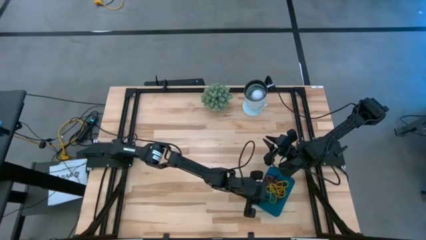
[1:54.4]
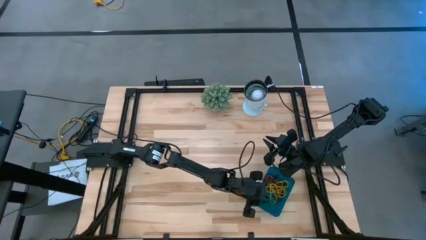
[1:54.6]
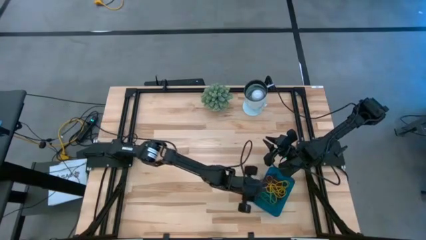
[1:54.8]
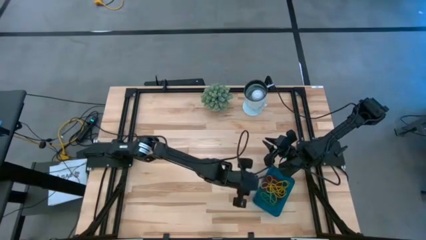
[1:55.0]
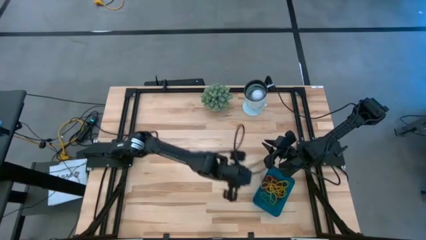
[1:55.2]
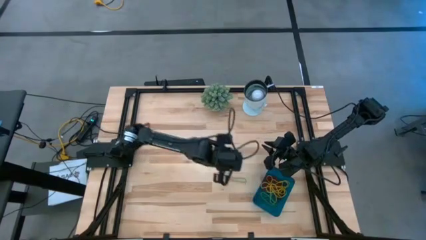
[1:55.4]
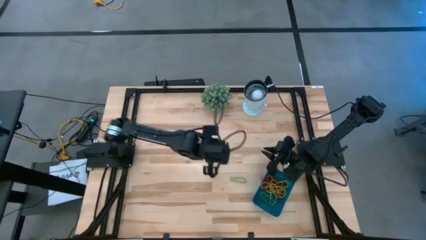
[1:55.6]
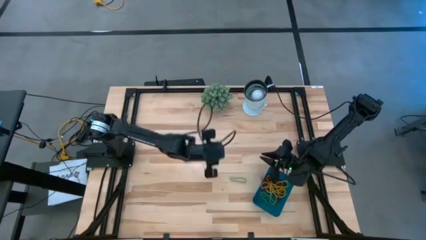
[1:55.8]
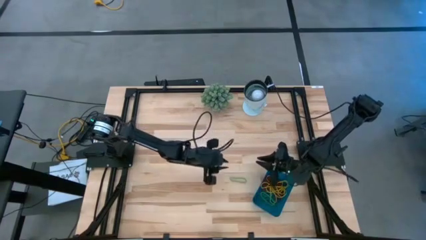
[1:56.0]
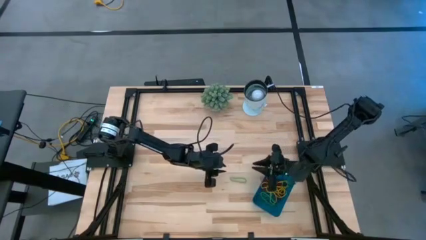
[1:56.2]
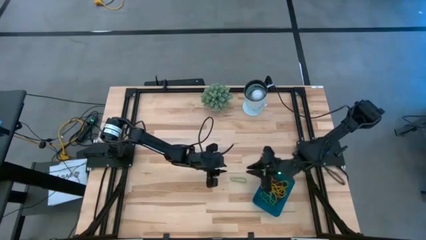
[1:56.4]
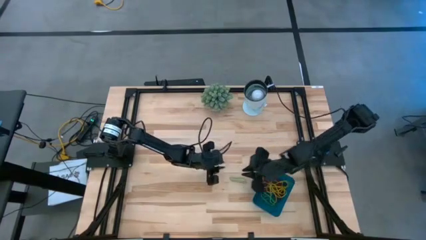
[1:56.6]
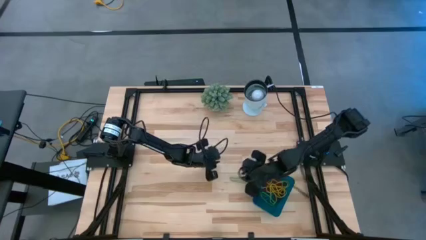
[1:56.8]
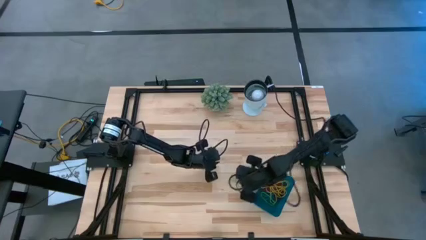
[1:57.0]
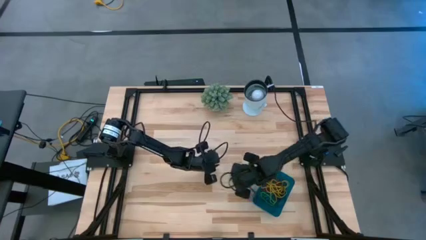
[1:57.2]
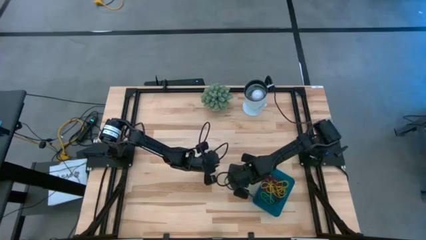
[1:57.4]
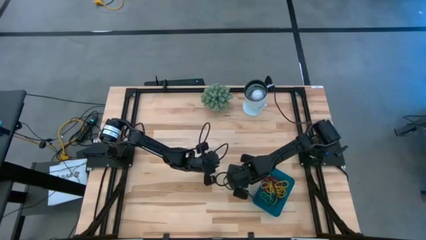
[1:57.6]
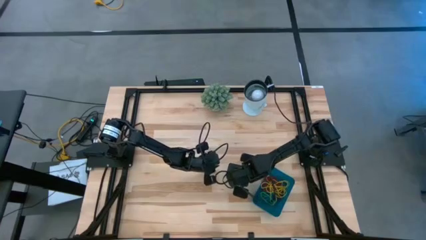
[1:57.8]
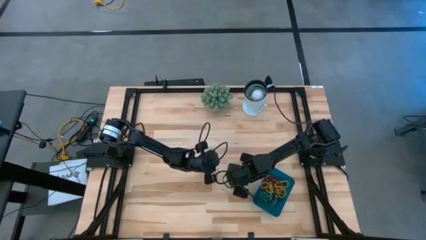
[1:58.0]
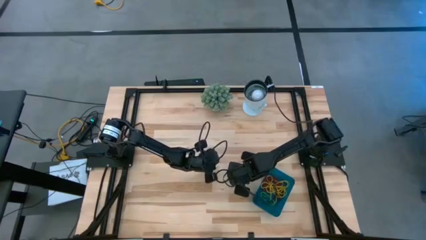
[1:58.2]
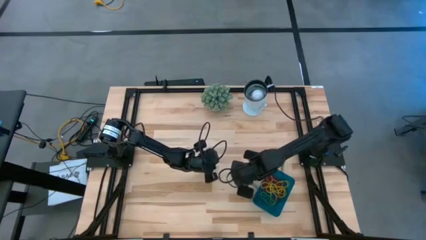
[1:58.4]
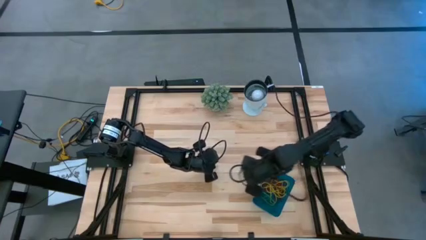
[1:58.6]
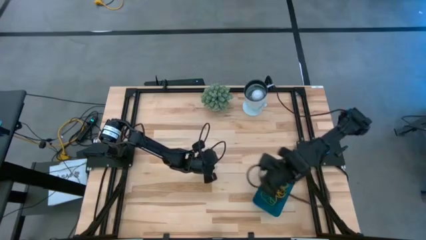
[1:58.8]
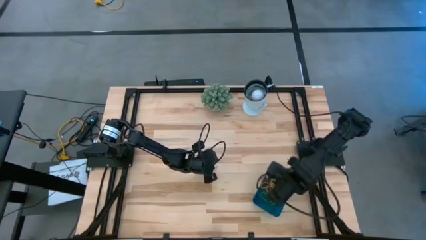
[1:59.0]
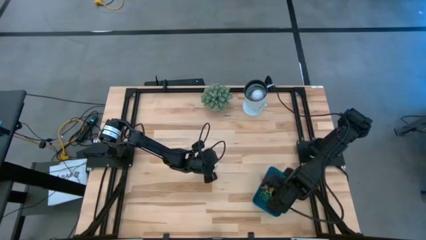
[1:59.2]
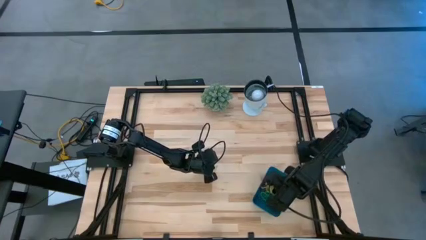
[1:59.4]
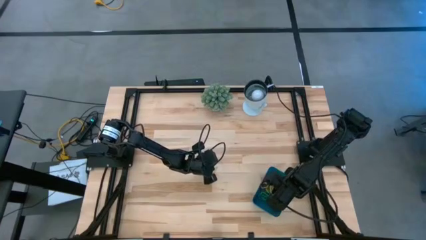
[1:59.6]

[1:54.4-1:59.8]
Task: Pick and place items into bin
Put the green rubber band into the blue bin

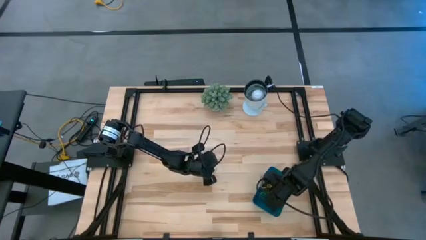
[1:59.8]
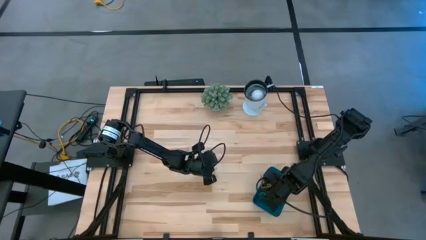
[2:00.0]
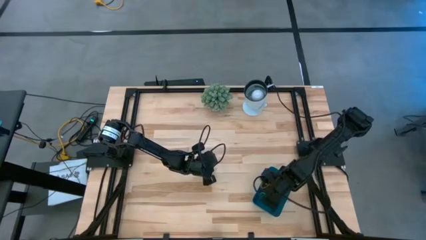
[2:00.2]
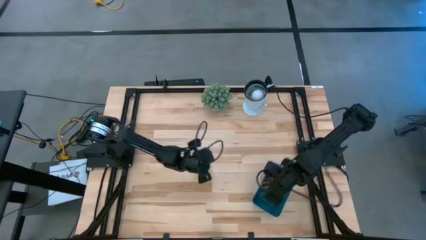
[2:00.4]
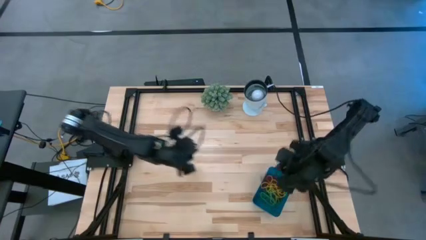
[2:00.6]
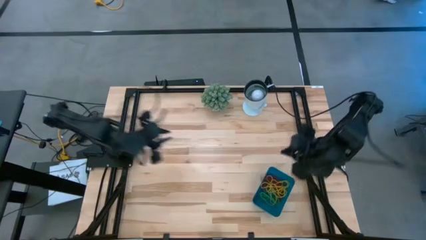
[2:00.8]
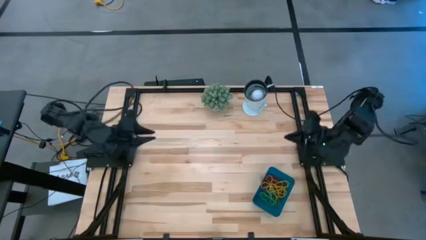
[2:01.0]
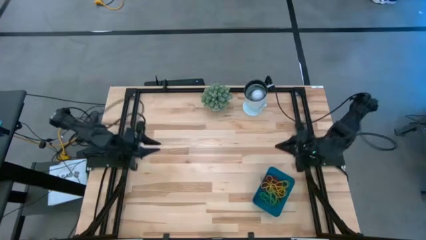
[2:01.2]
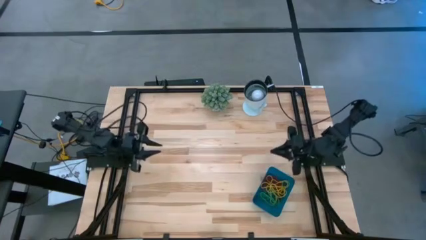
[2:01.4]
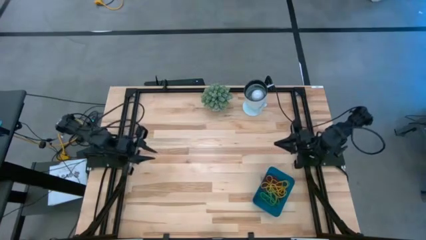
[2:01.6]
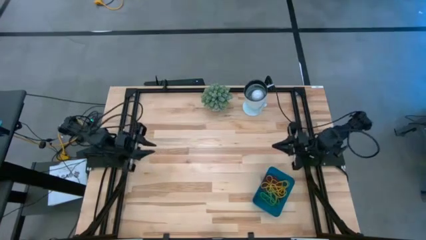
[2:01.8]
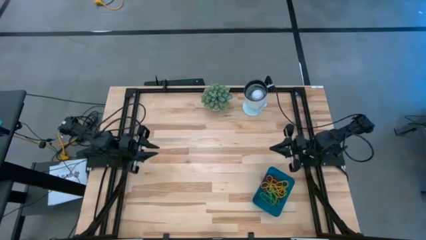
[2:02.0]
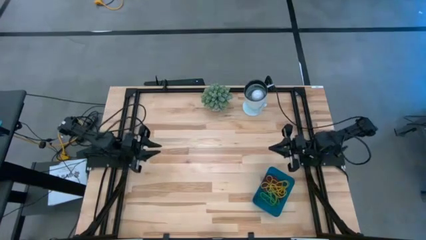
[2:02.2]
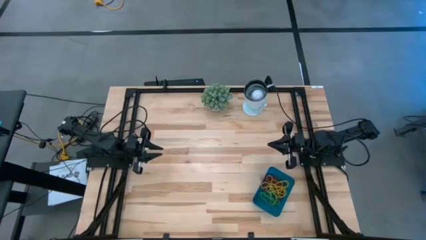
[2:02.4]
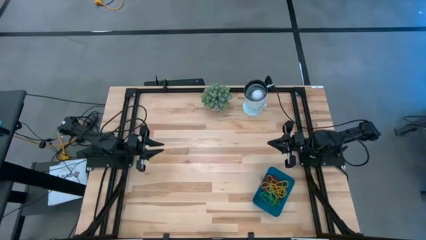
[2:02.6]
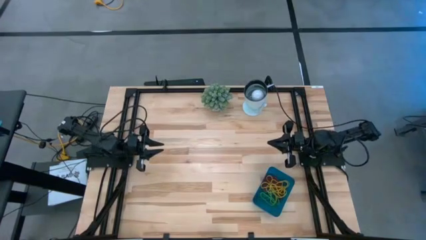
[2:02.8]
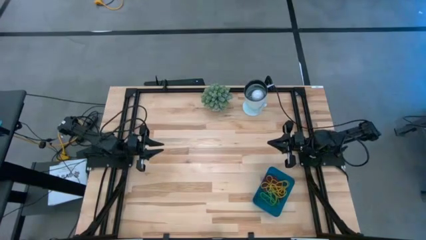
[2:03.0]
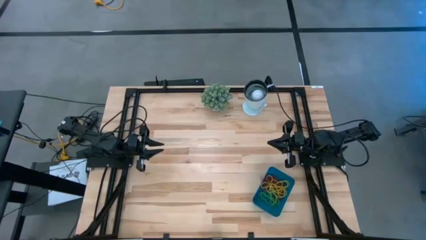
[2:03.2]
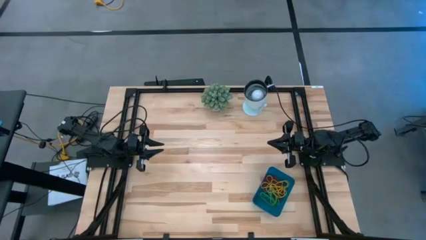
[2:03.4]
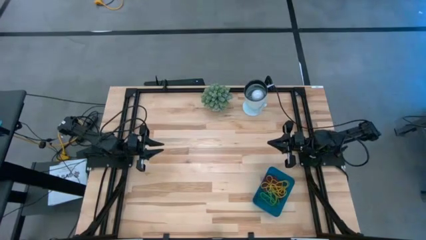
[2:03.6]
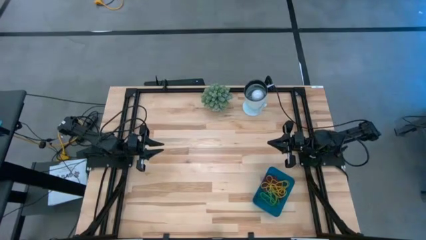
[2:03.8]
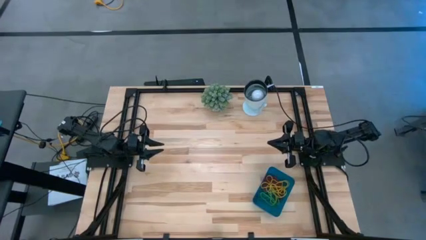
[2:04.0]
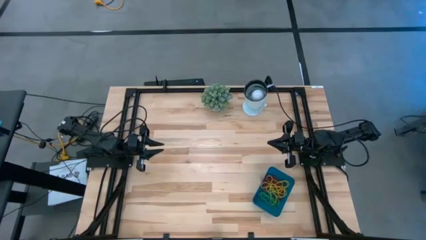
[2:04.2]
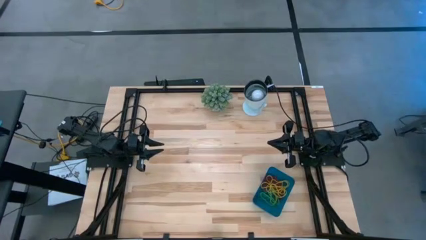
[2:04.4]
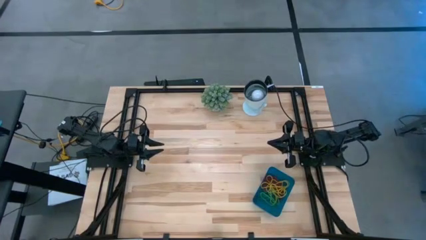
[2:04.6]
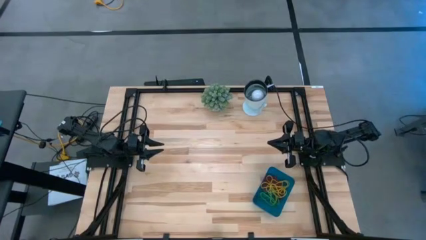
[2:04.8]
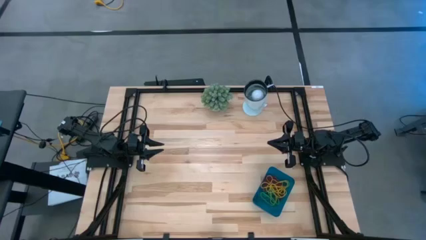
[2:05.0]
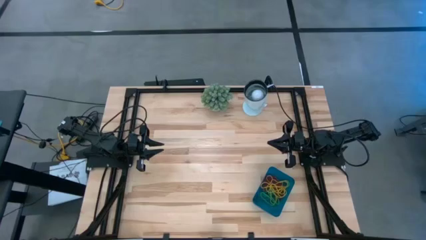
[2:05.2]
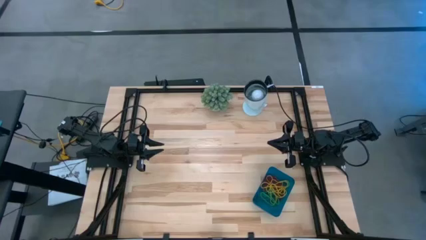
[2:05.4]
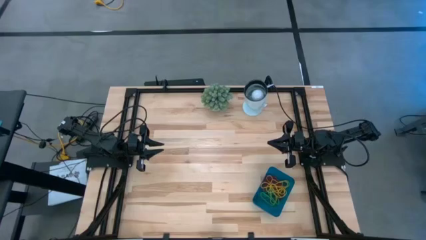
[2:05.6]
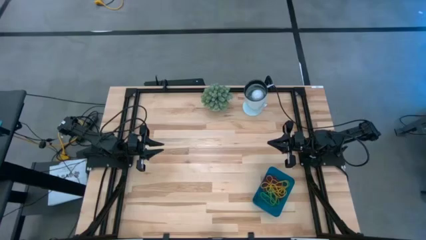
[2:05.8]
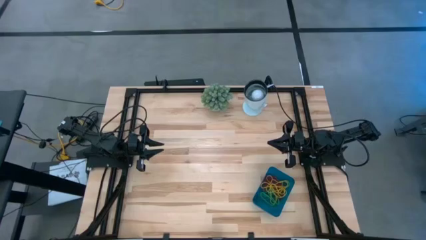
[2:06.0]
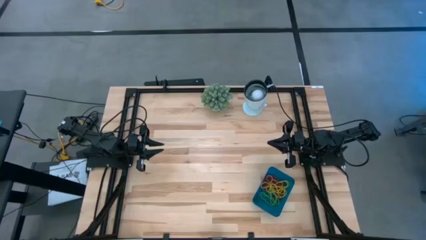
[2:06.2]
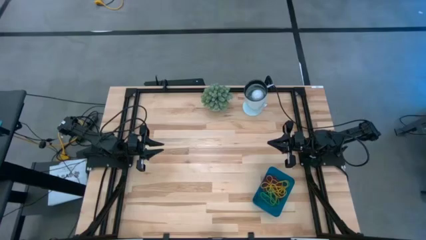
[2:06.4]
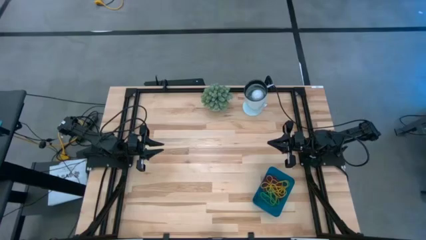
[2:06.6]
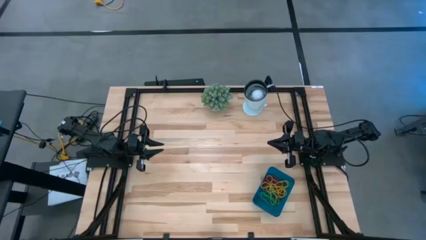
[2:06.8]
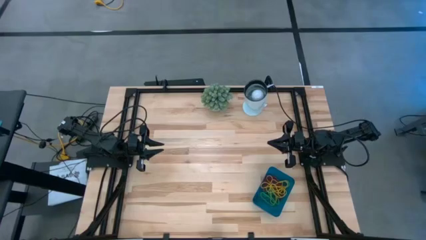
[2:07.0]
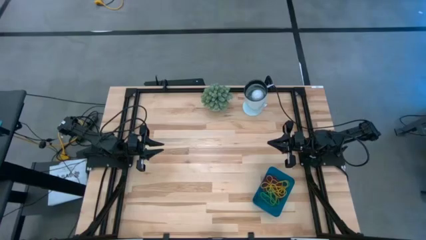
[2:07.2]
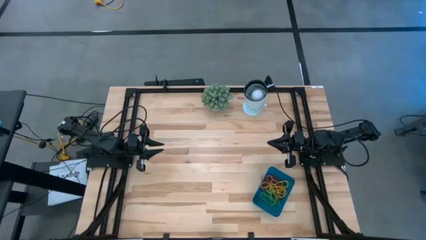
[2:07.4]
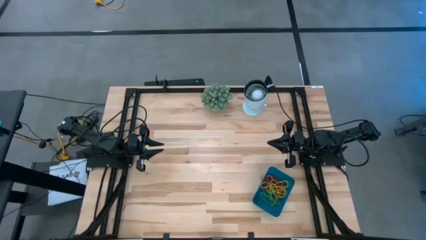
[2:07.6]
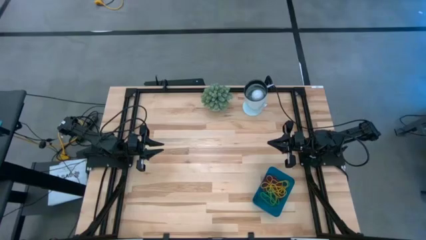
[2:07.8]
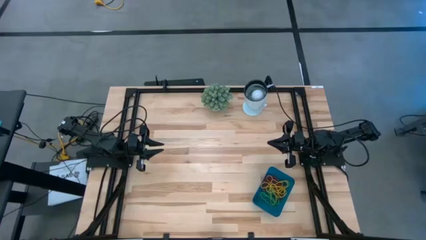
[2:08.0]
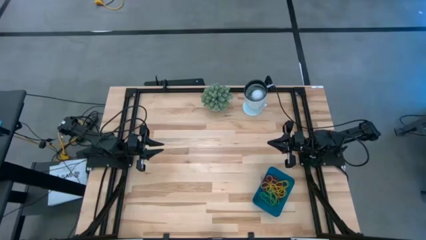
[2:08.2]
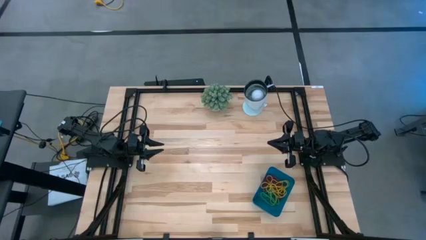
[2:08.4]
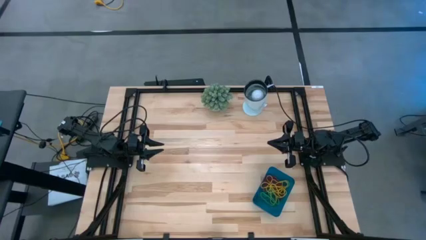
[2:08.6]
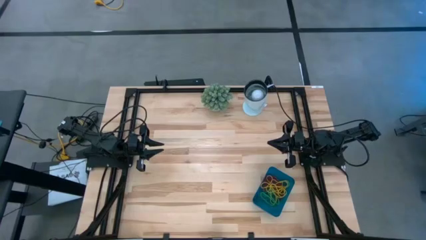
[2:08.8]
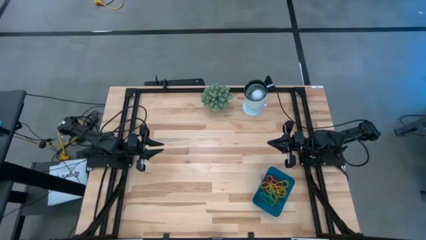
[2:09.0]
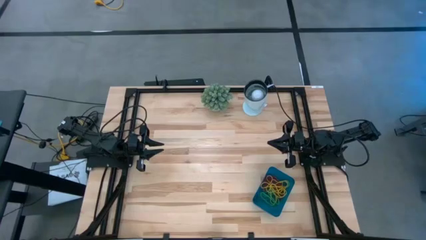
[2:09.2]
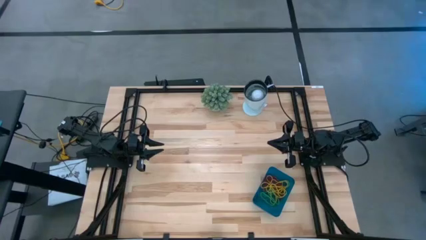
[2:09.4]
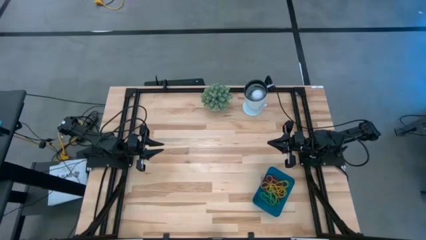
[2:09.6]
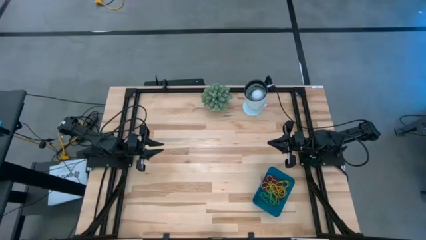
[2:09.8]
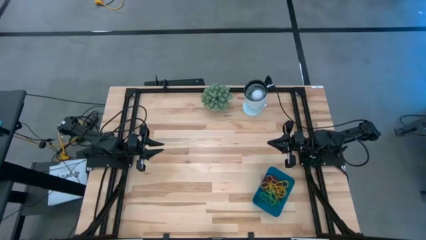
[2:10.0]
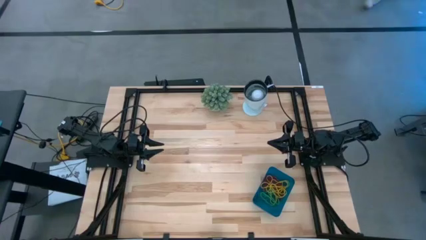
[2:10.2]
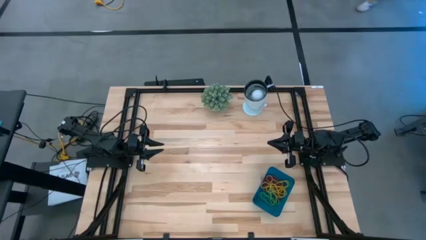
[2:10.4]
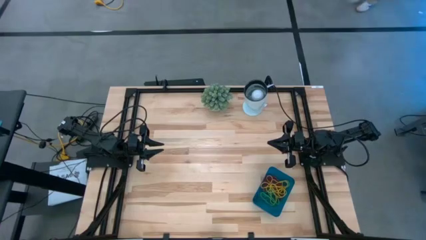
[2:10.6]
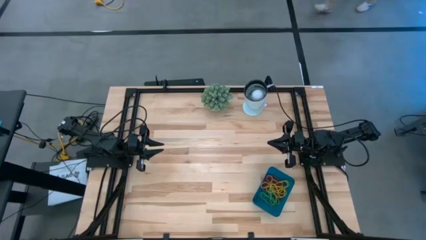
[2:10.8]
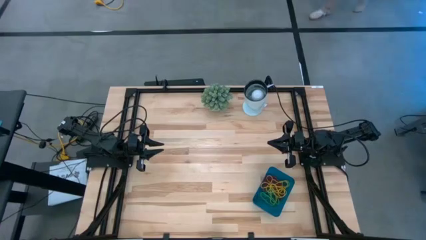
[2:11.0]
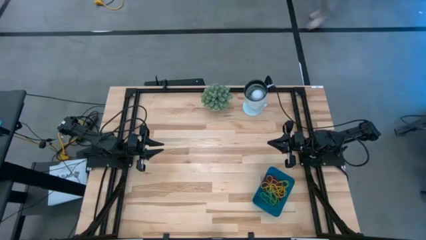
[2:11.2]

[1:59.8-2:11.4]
Return to Home Position
